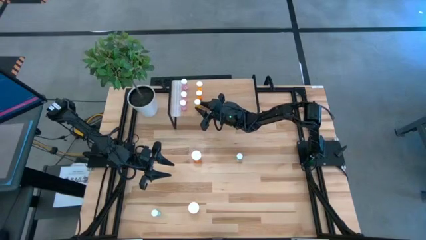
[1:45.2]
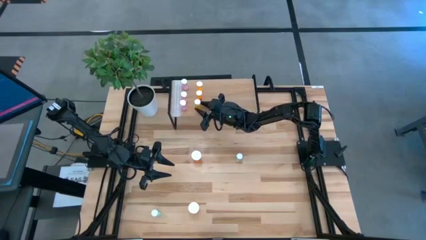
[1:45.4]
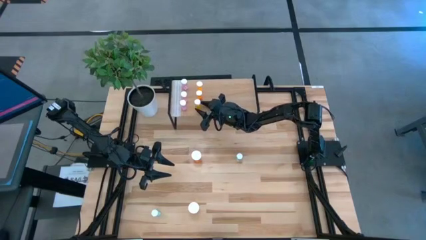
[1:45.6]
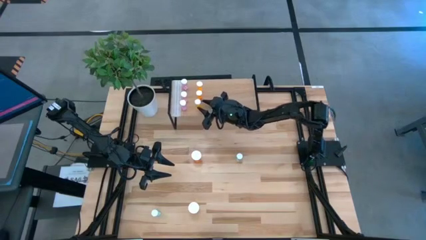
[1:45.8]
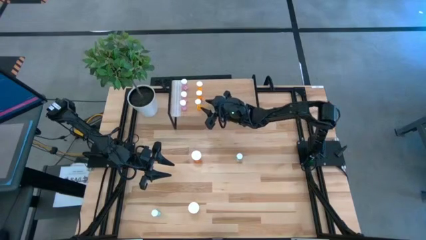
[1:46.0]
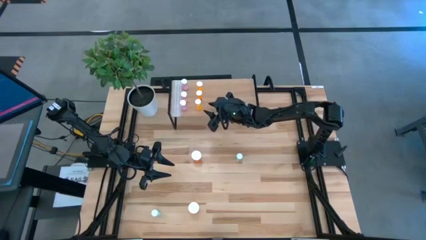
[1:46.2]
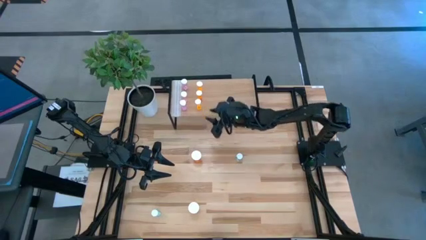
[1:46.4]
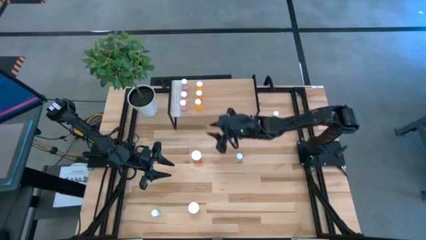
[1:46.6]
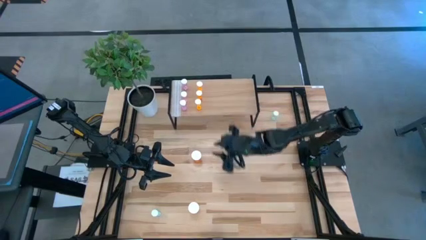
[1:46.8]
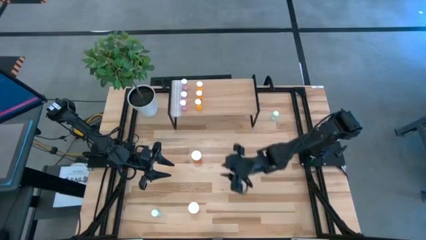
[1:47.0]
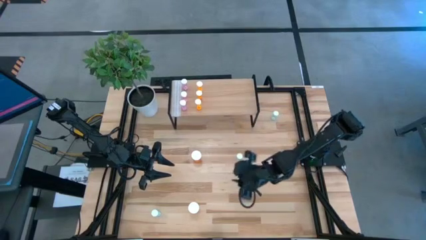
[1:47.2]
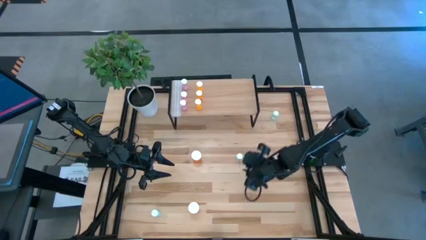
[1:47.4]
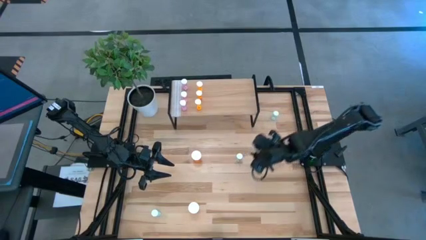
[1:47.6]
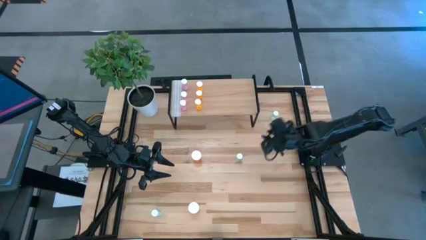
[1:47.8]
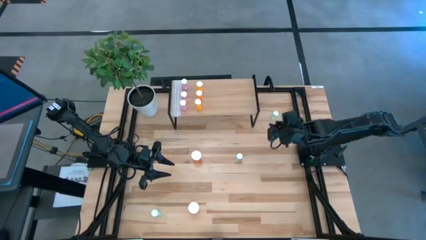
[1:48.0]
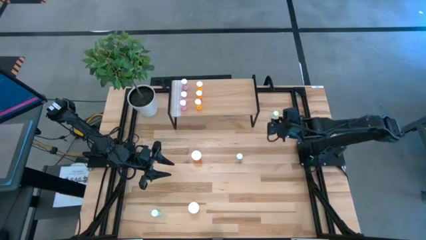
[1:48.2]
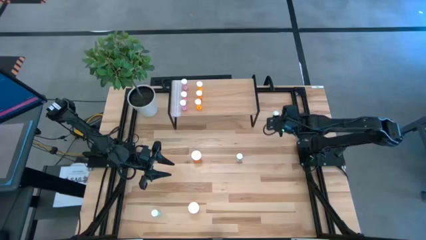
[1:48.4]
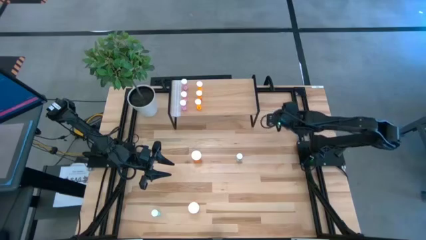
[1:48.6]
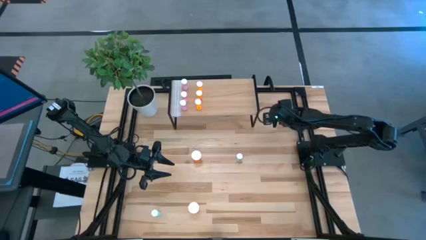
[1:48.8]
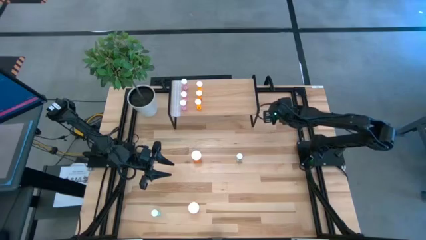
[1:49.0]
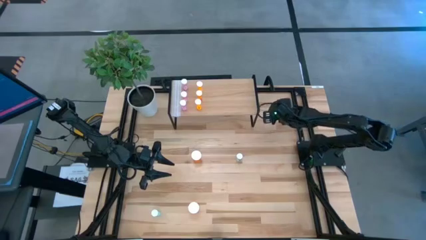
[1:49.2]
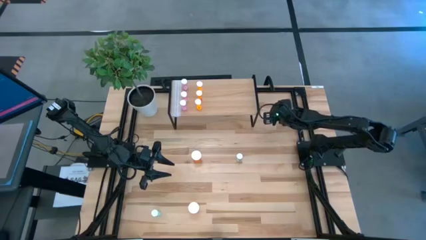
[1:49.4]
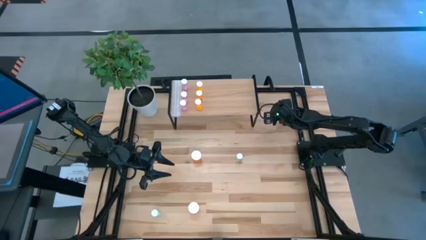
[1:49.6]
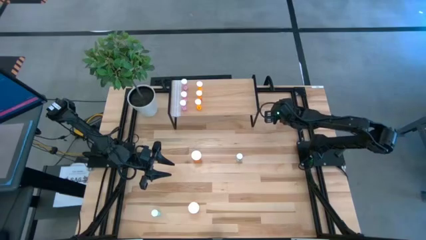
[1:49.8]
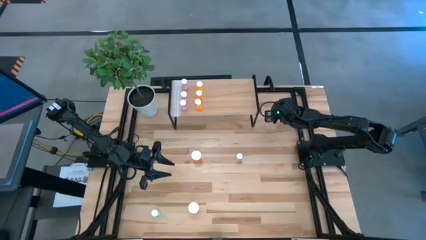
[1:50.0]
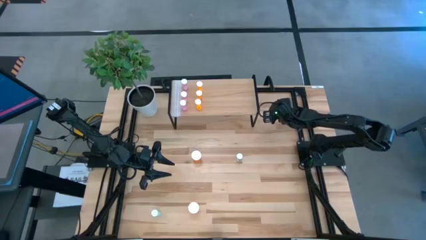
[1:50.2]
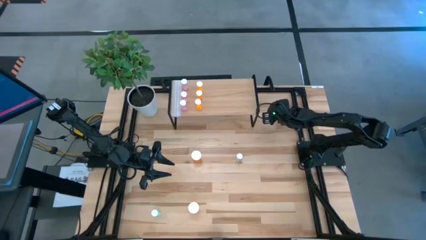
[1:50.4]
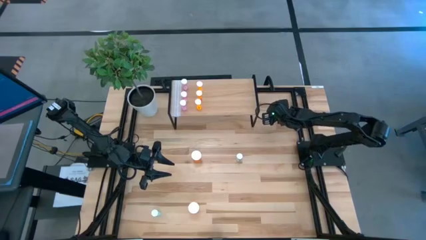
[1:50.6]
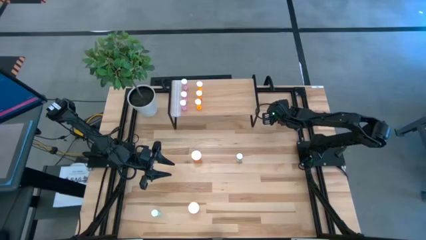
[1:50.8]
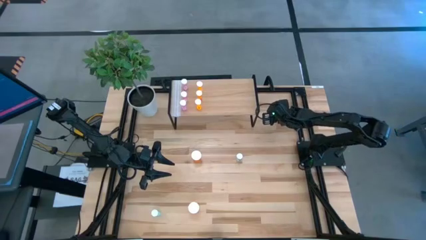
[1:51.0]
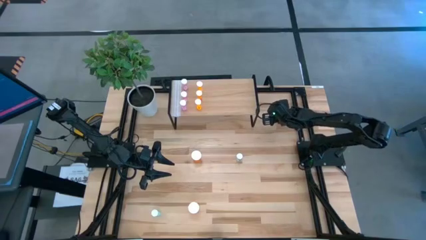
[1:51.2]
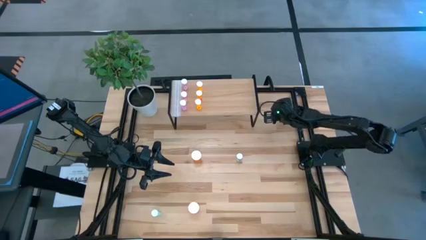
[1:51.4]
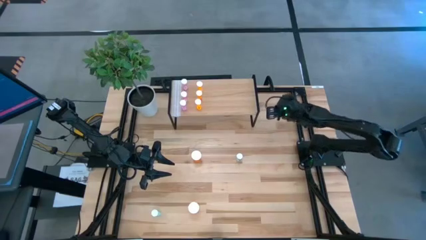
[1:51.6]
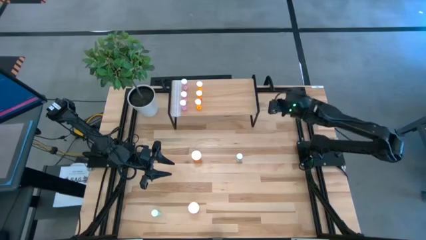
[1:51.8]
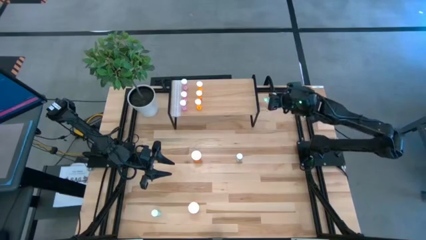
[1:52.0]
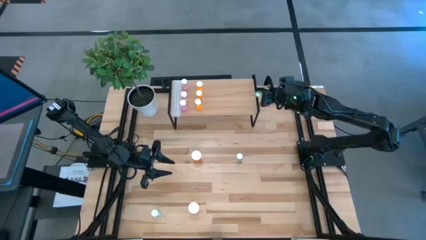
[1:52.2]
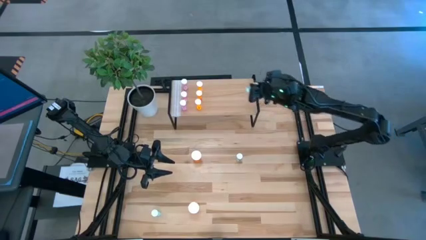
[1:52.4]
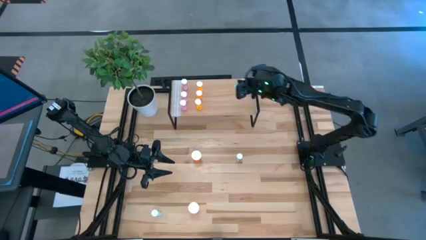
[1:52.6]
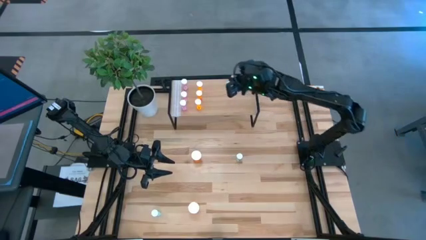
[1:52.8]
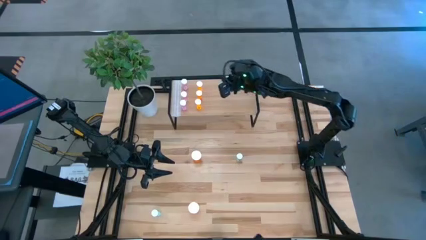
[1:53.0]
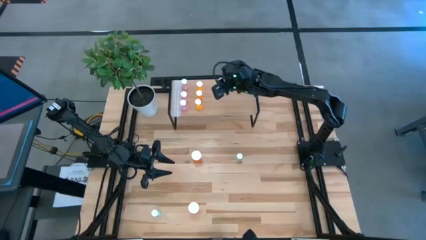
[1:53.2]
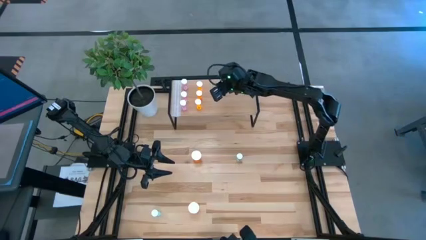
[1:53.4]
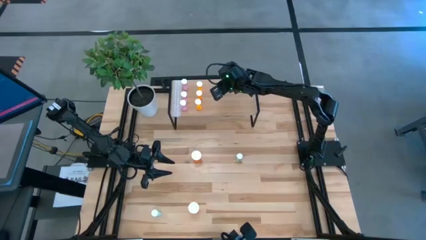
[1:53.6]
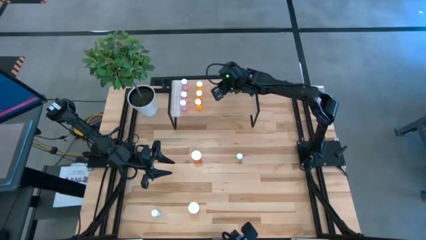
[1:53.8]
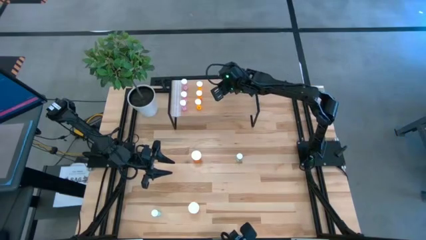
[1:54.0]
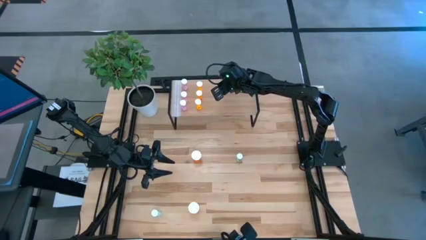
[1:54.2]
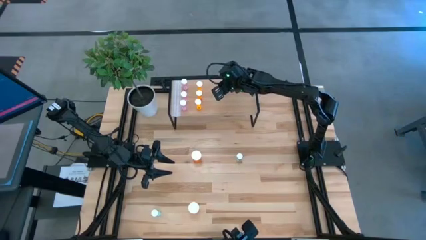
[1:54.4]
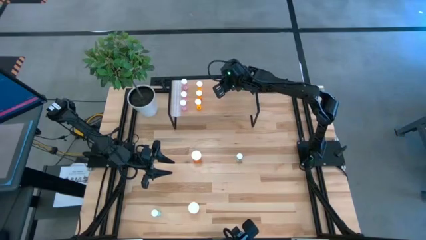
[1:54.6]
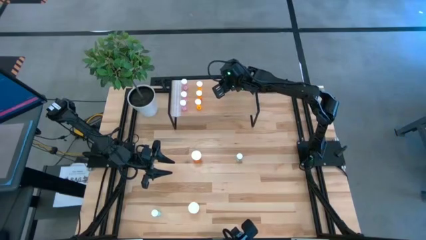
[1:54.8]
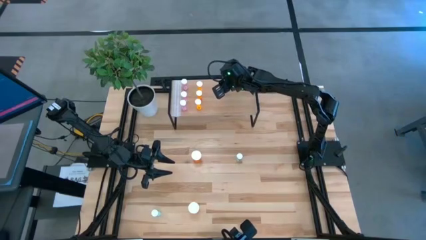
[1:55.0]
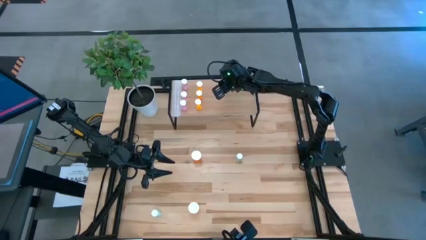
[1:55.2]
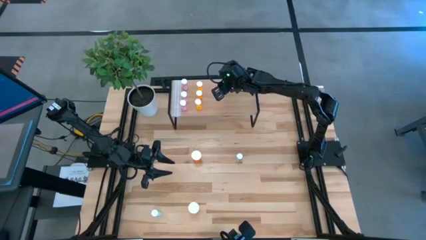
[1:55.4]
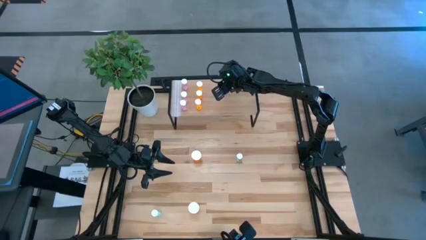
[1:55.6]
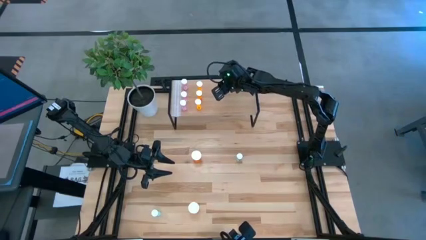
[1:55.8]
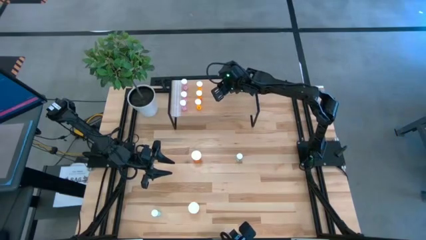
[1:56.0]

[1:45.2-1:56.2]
Task: Pick and place medicine bottles onto shelf by color
Put the top right blue pill bottle on the shelf

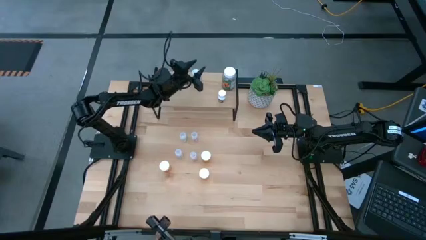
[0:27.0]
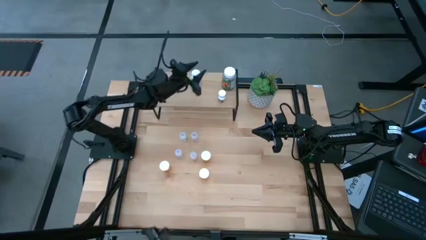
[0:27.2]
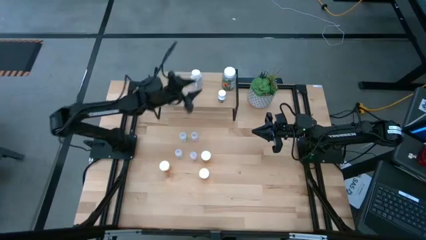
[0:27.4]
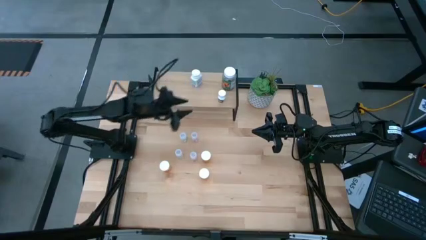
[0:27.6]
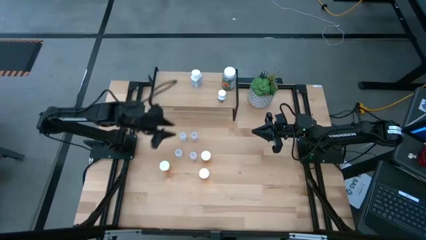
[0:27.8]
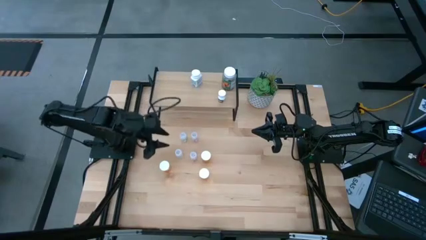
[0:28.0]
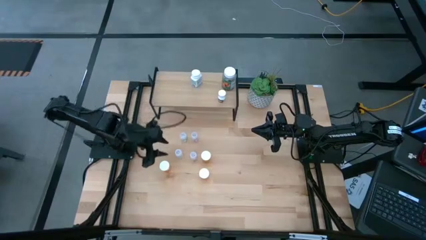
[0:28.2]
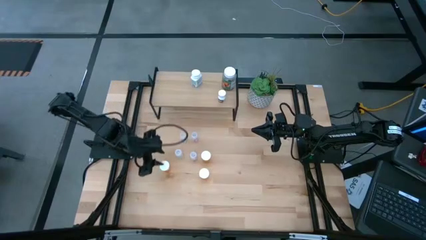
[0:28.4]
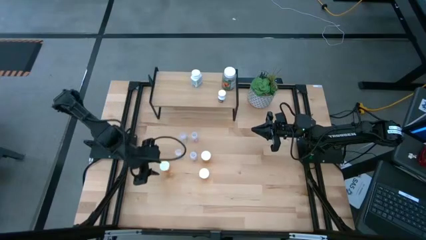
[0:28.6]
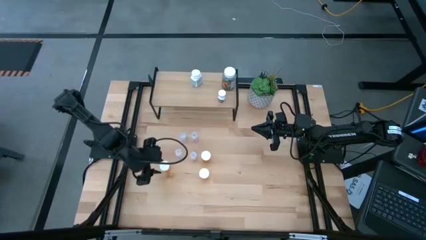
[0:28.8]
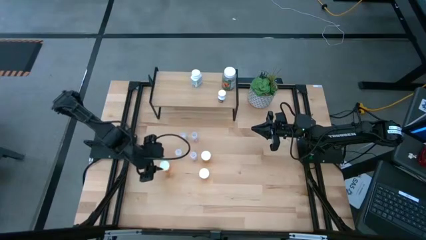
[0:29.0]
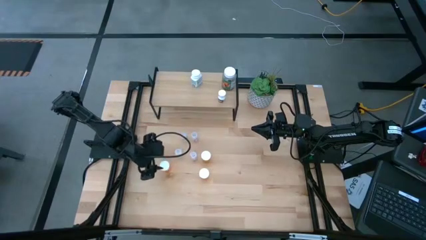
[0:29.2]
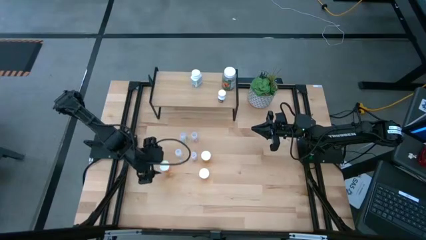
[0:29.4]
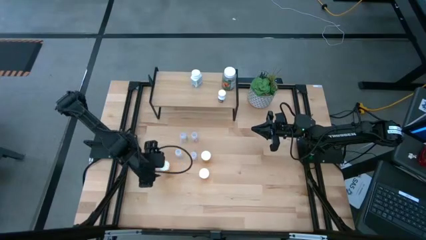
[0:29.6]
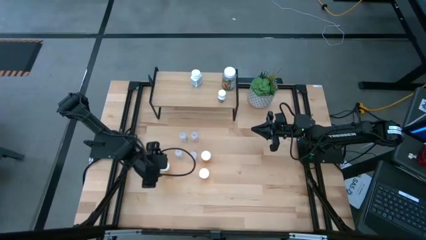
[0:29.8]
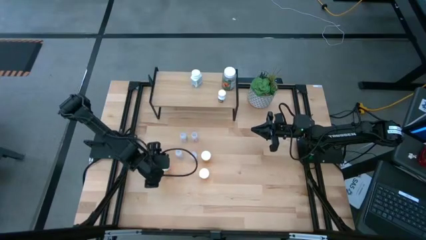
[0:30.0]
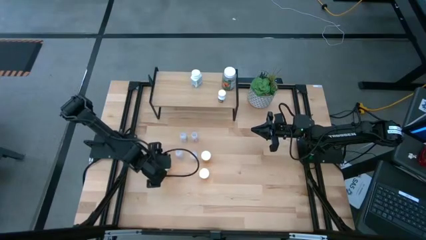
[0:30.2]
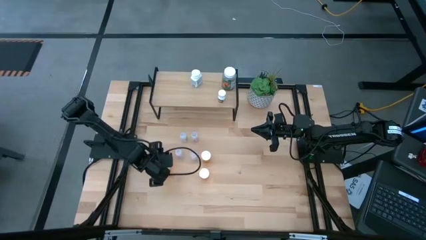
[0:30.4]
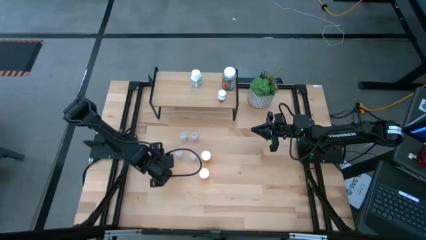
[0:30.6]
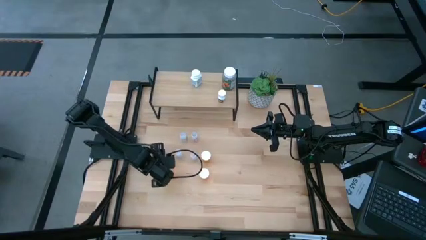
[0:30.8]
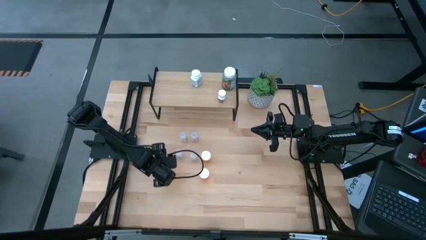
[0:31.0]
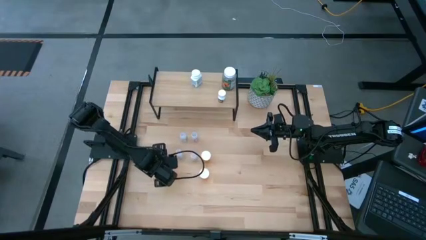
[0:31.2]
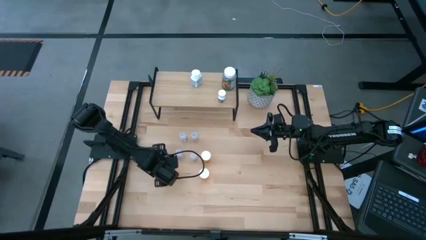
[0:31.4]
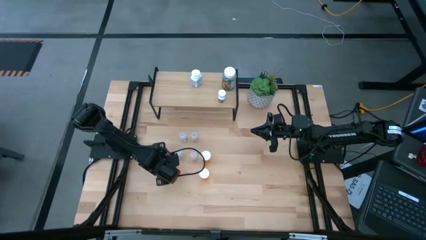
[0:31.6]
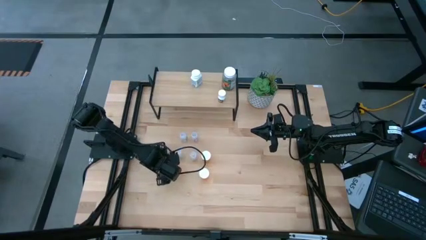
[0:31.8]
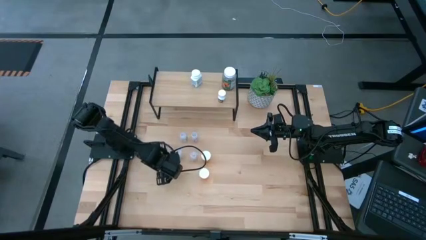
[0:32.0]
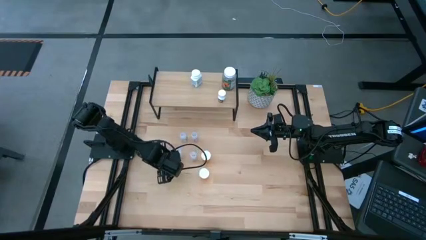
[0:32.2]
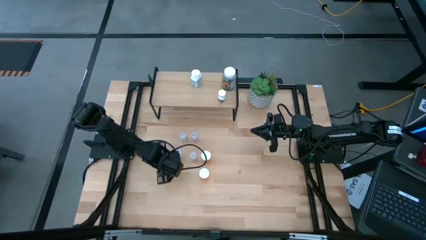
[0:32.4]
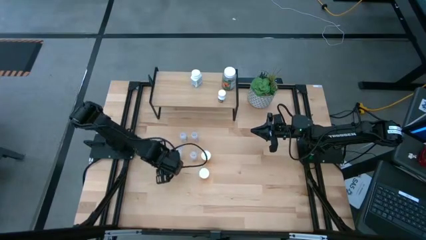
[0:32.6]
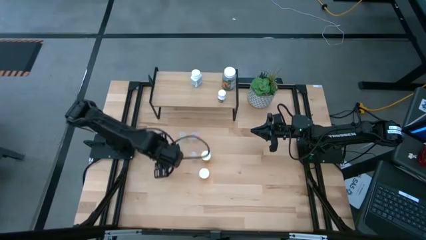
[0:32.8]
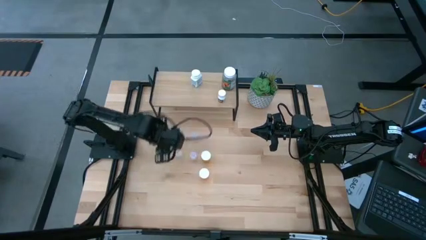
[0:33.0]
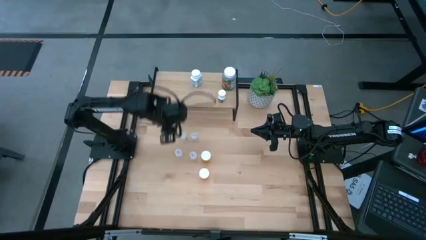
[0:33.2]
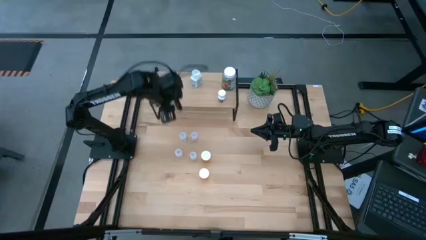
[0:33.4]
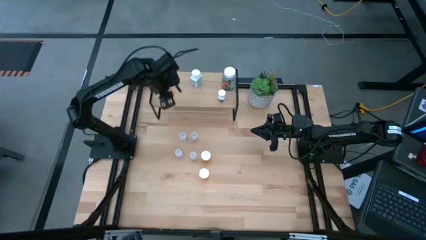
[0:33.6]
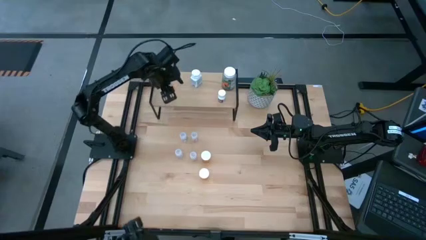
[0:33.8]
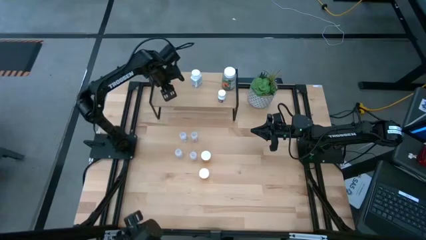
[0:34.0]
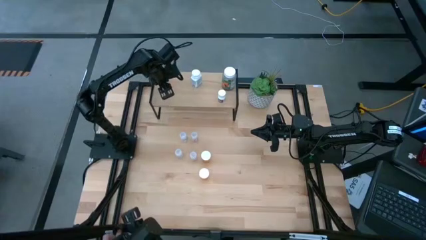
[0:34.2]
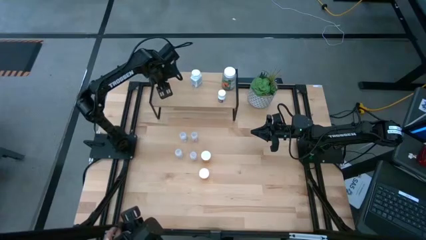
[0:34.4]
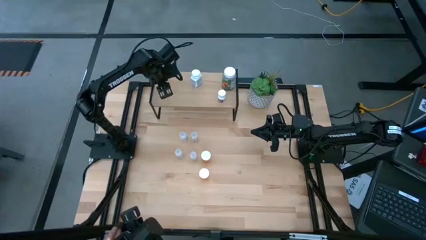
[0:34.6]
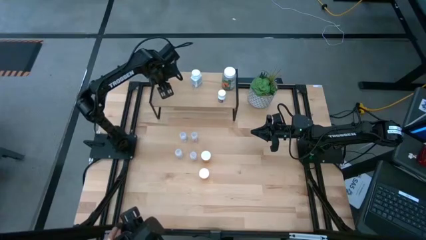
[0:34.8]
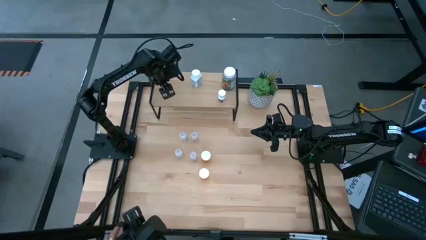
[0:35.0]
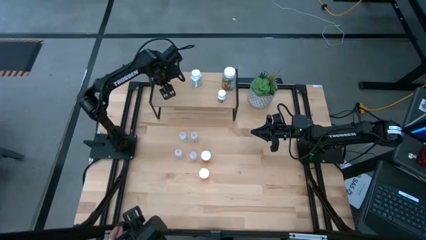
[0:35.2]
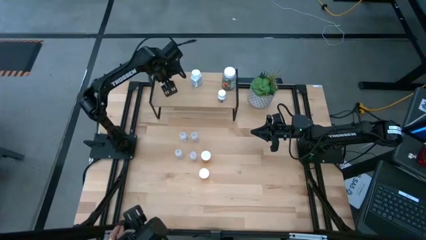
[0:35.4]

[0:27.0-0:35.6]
Task: Pick and place medicine bottles onto shelf by color
Put the orange pill bottle on the shelf
